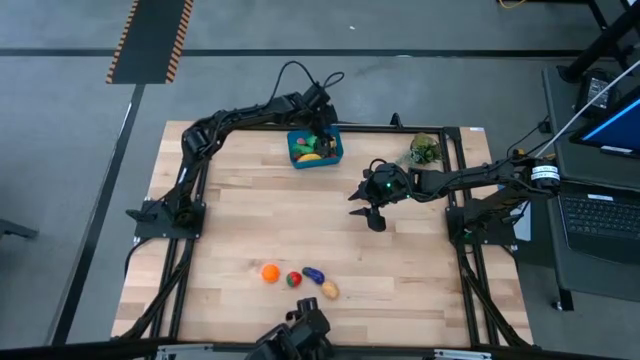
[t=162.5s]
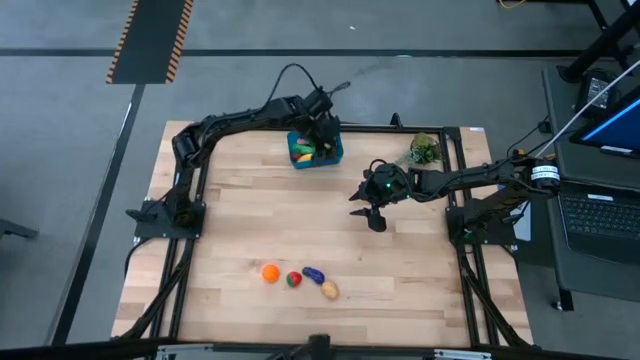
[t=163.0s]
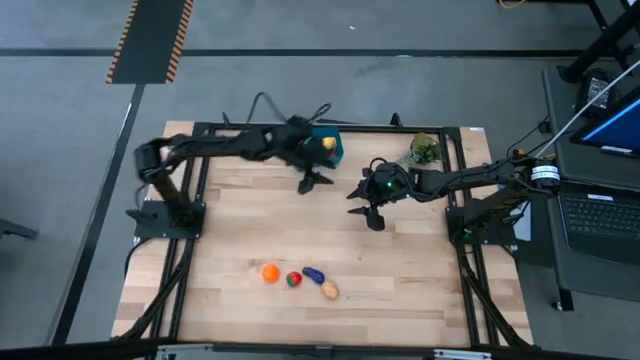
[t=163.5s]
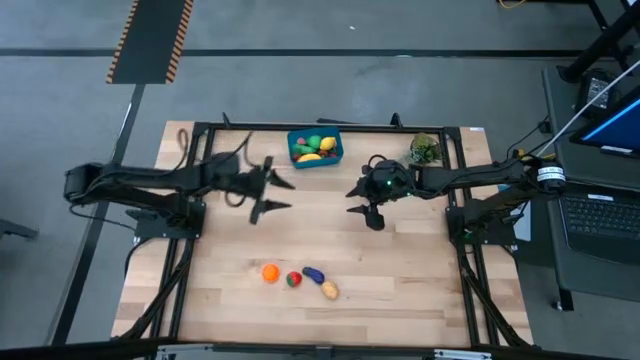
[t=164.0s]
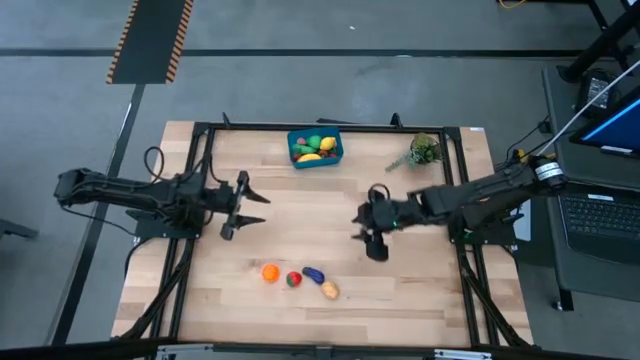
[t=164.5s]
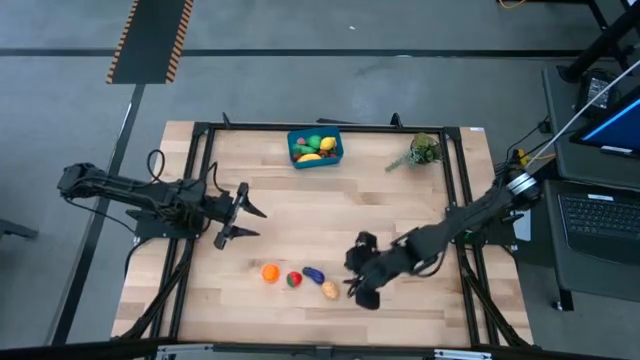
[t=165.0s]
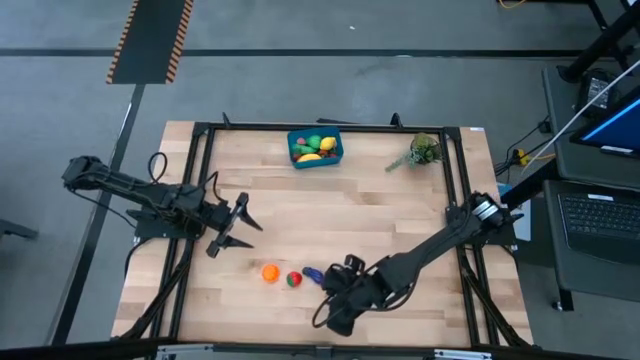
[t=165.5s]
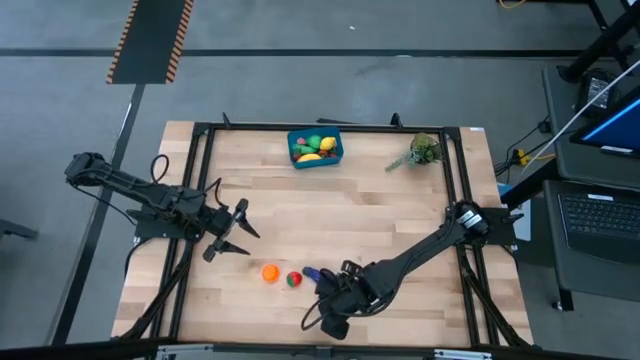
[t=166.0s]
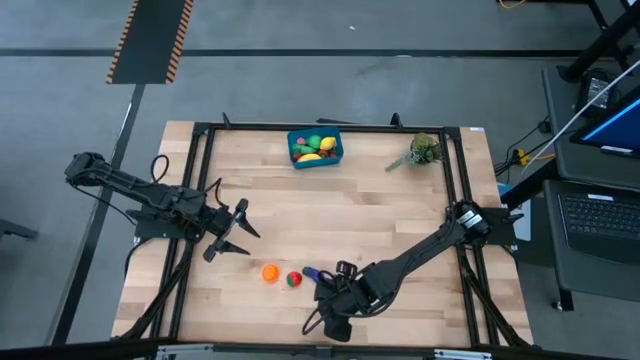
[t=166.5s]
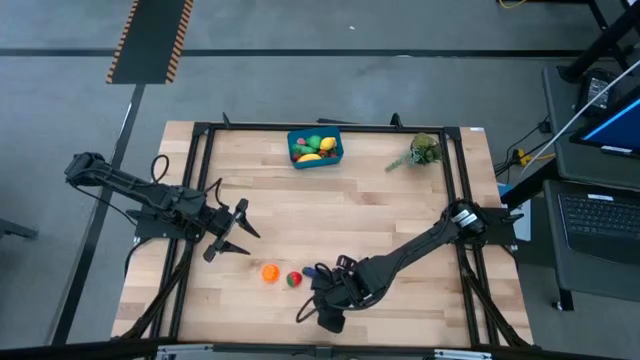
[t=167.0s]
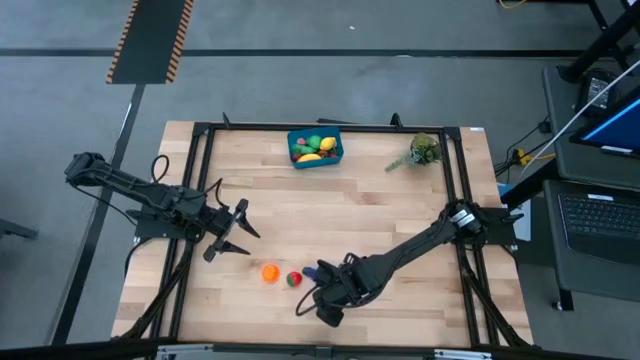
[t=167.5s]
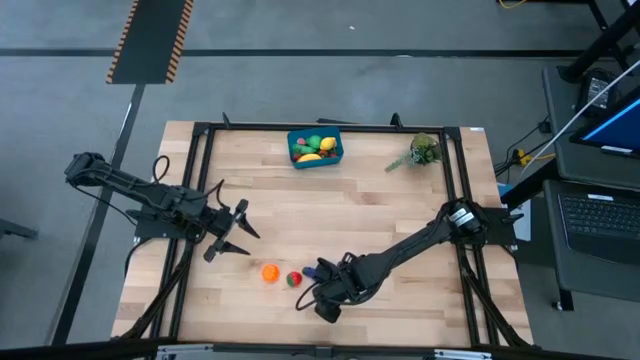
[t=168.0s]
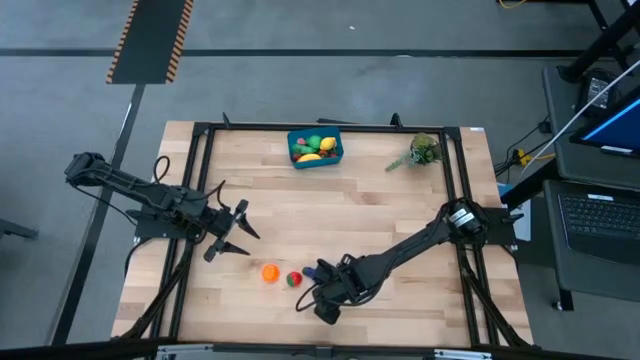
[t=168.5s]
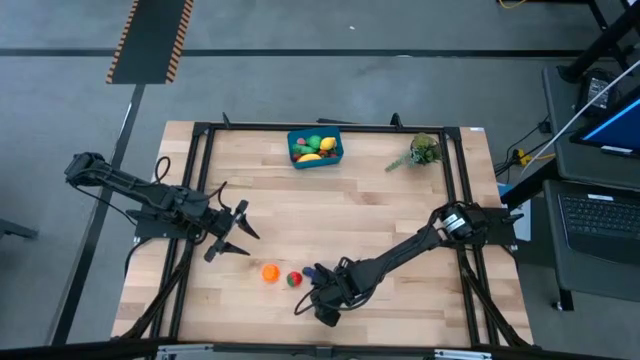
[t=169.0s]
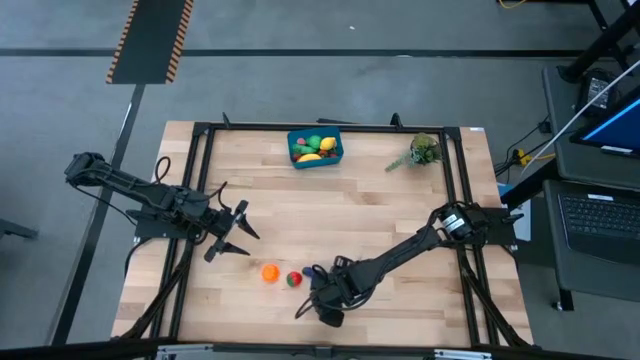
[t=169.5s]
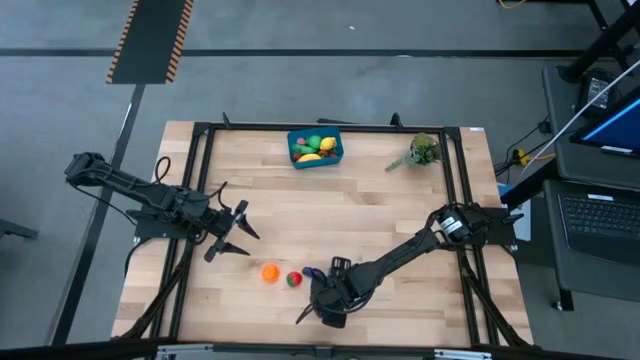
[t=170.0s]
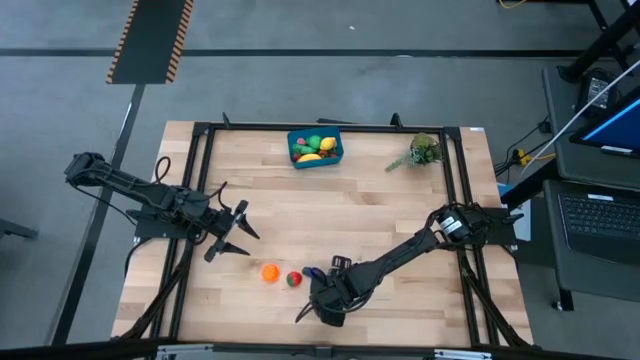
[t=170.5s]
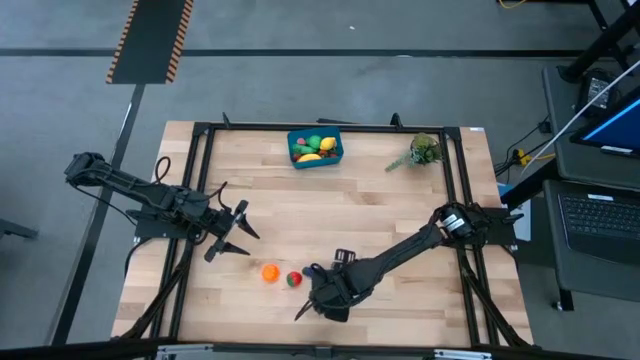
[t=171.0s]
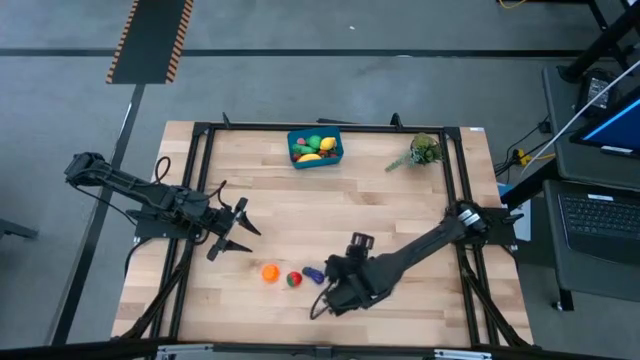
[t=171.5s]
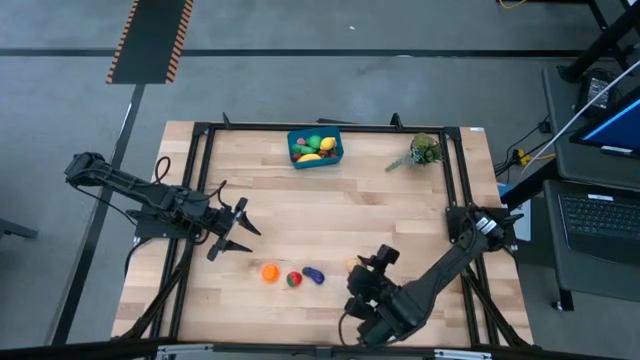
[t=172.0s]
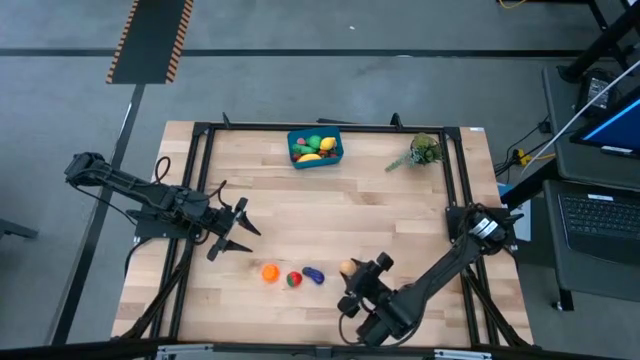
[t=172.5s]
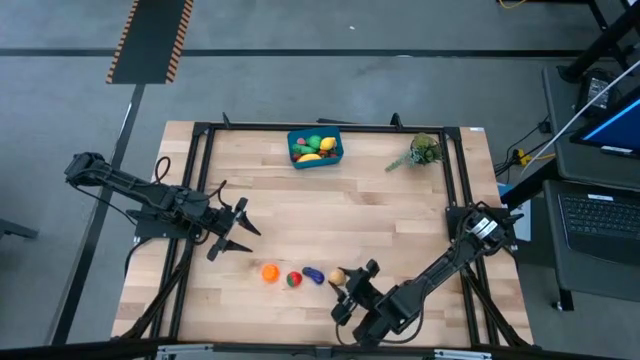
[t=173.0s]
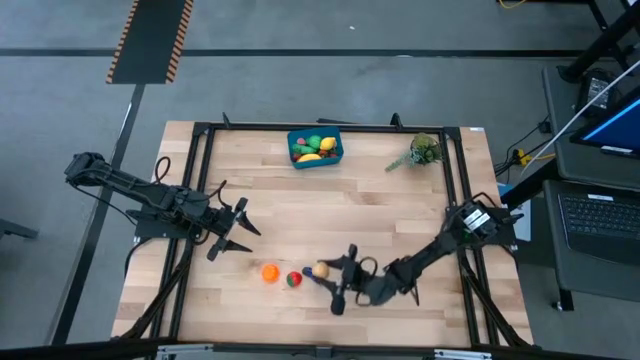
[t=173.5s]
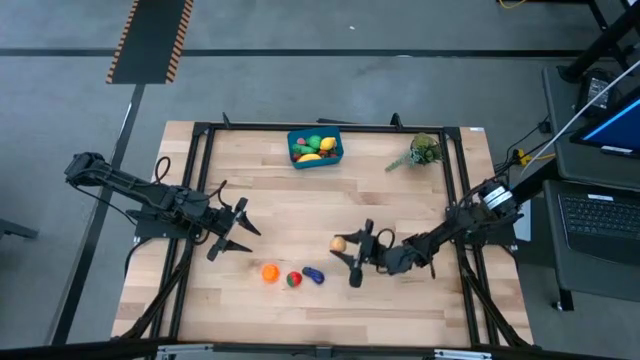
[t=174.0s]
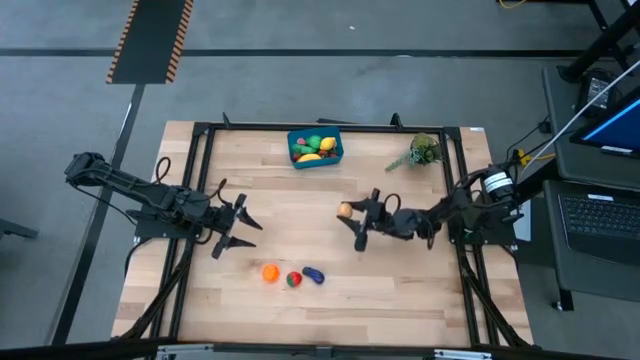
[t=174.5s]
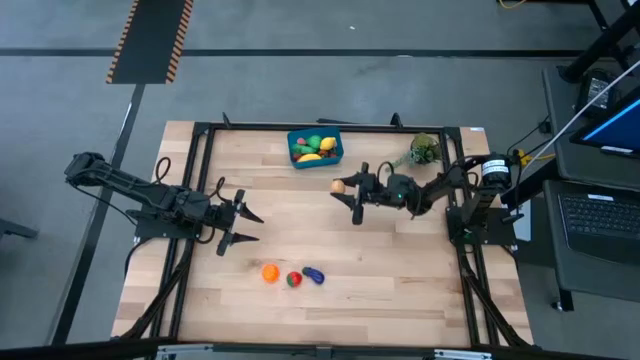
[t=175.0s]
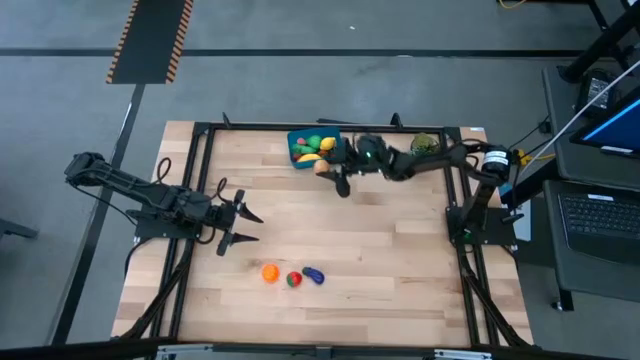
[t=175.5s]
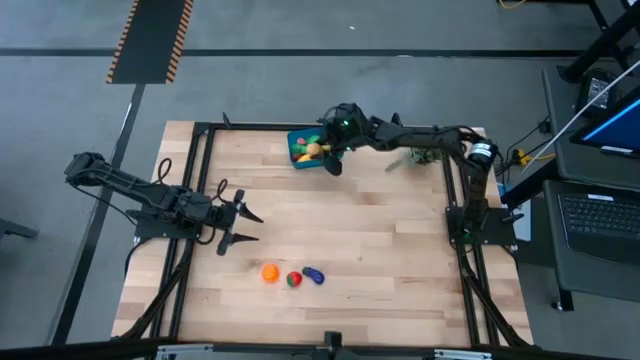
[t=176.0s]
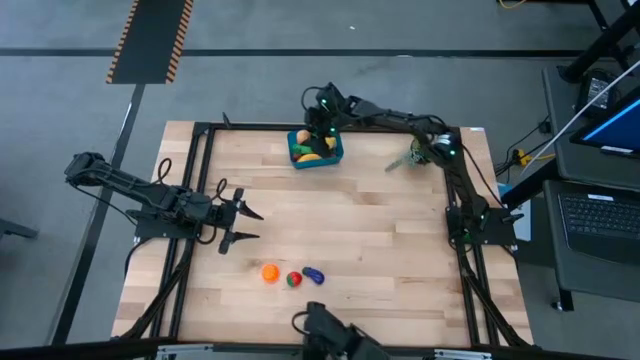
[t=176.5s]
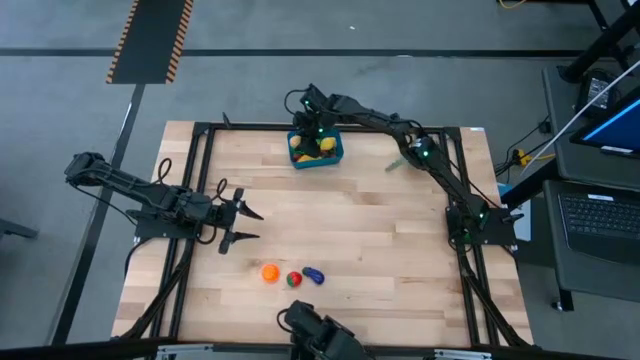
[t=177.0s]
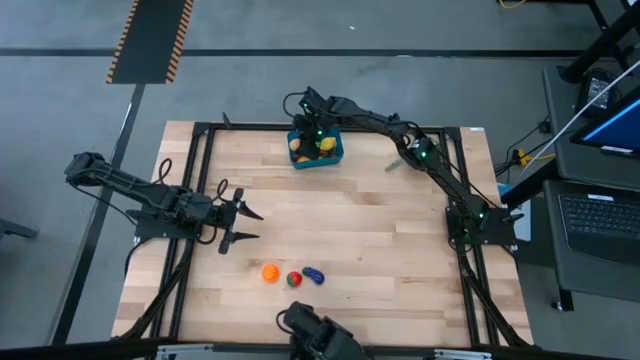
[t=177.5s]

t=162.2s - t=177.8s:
Task: Pick and placing Produce into tupperware
Put the potato into the blue bin

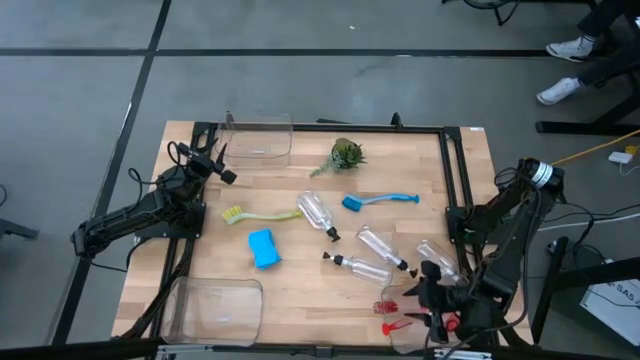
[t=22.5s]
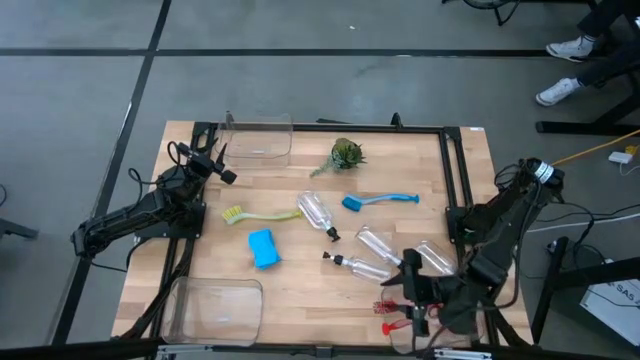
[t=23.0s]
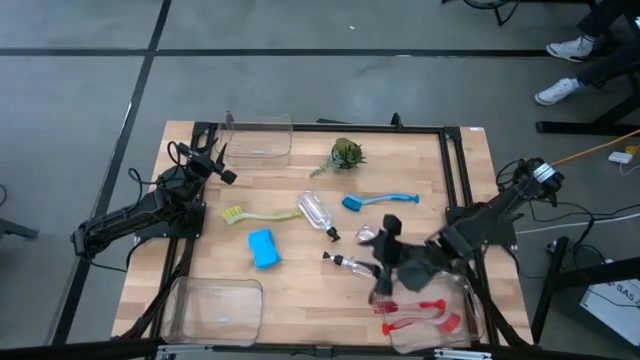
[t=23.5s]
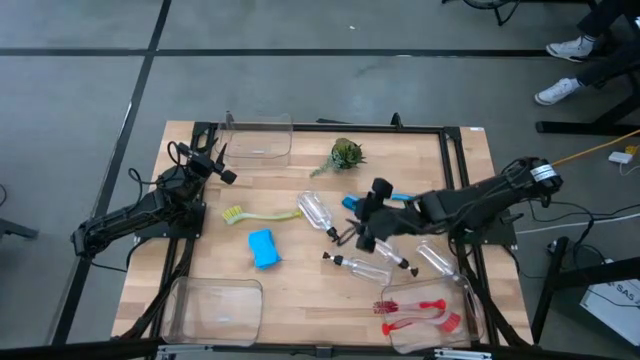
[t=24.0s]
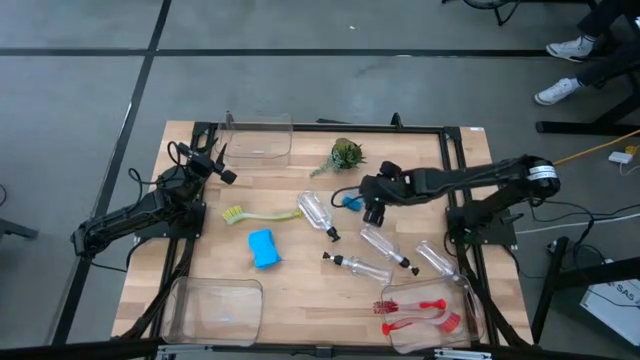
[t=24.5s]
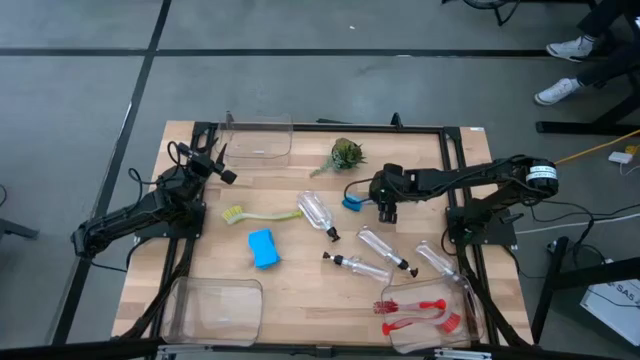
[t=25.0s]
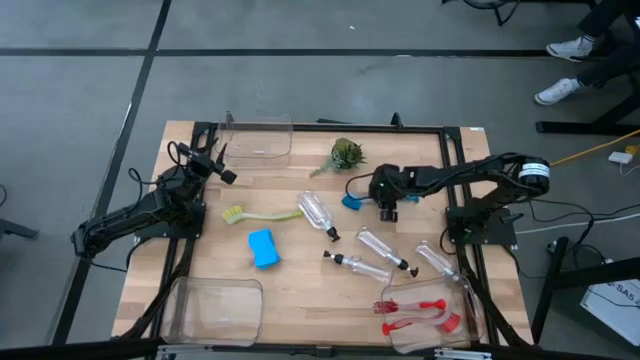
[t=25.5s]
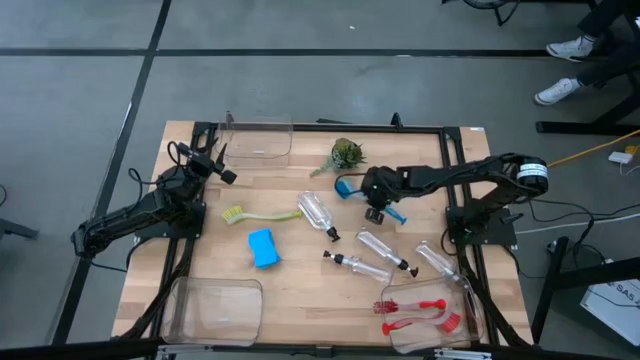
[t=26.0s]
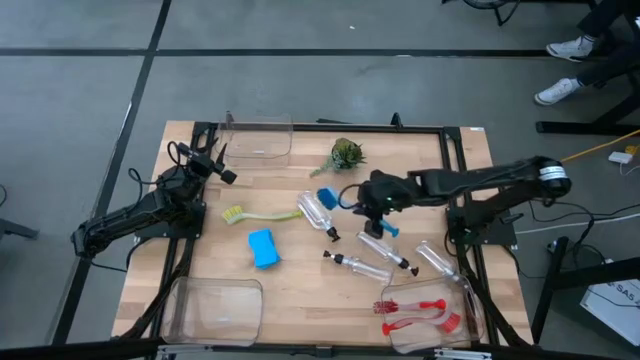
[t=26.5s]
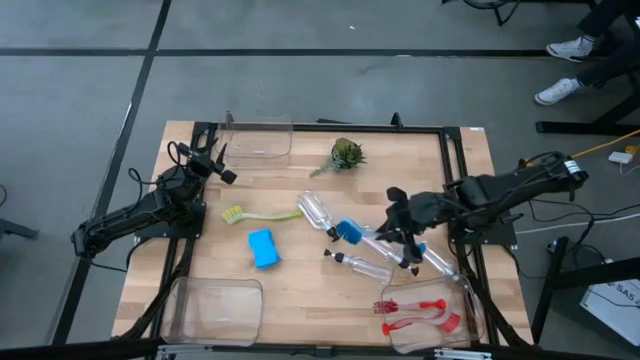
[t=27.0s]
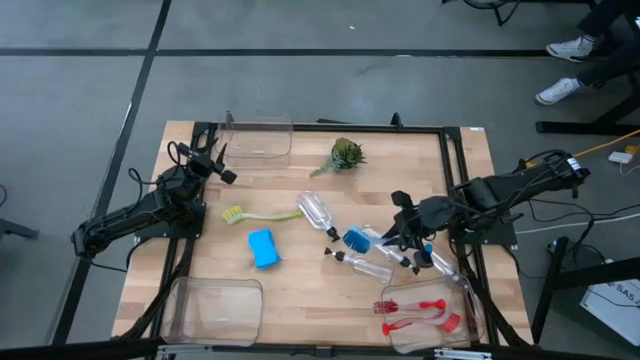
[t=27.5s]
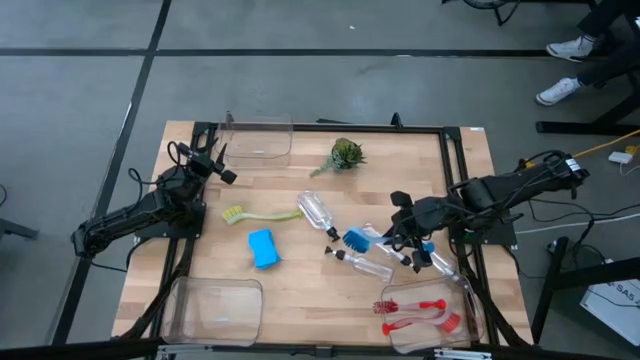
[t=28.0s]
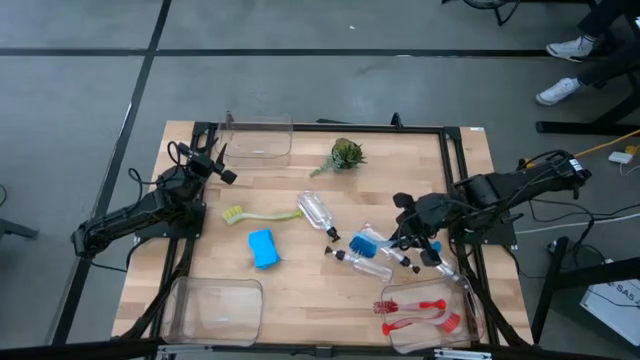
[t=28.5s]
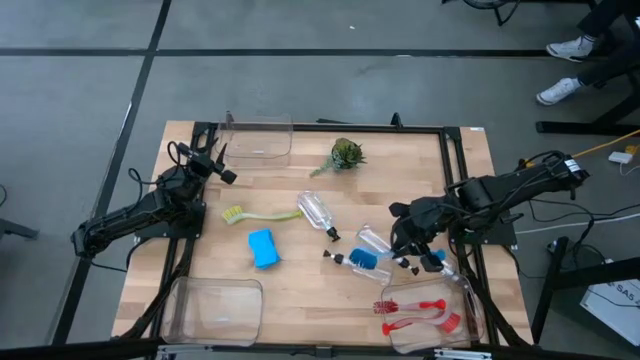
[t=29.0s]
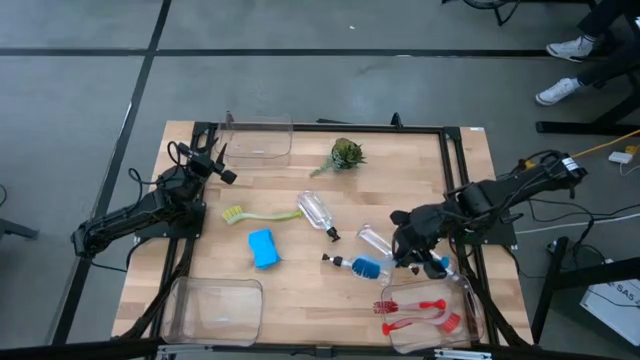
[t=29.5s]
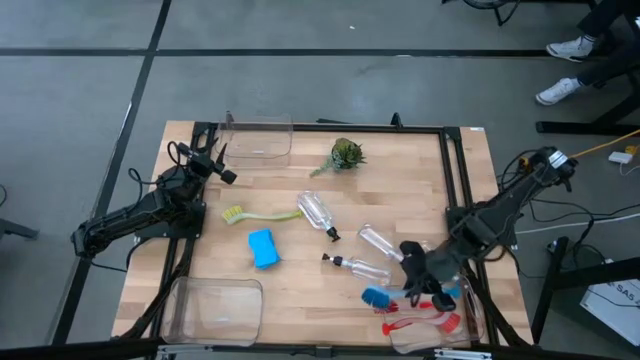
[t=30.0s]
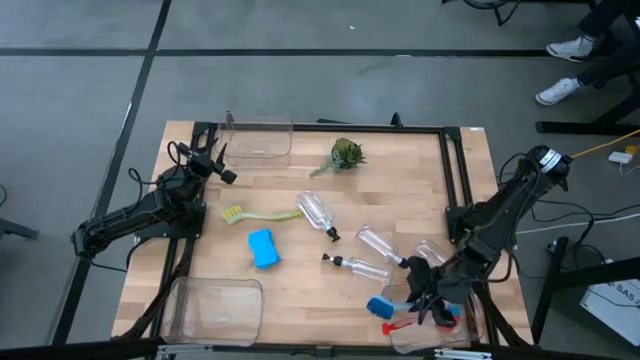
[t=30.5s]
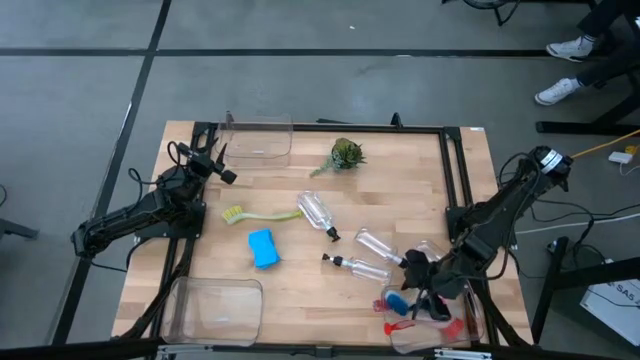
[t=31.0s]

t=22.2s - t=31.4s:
Task: Pick & Place Kitchen Sink Supplies
Put the blue dish brush into the bottom right transparent bin
